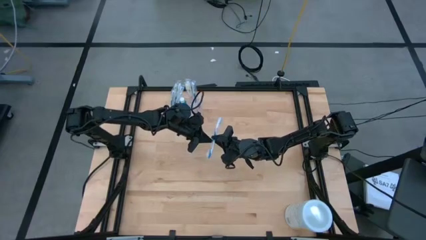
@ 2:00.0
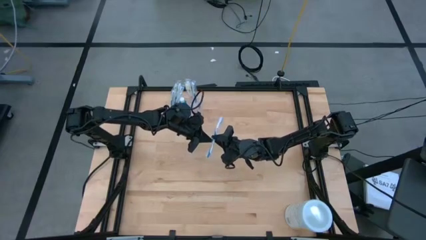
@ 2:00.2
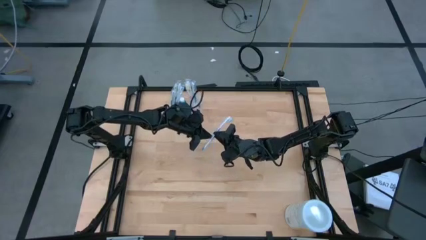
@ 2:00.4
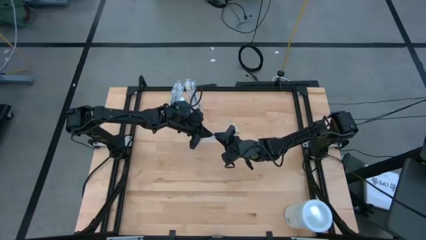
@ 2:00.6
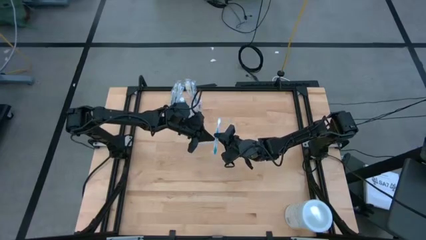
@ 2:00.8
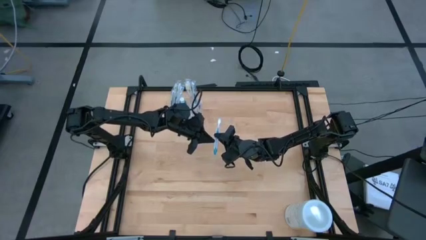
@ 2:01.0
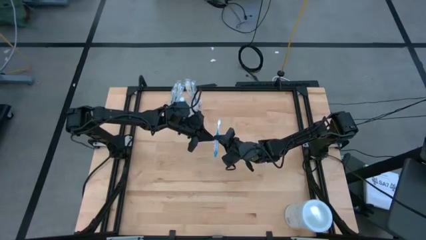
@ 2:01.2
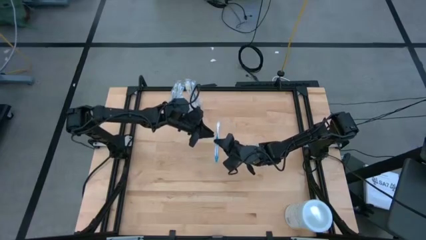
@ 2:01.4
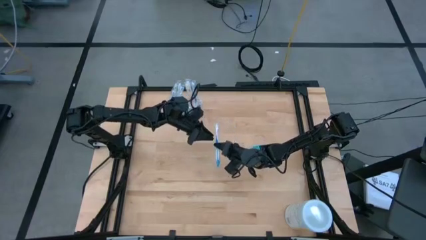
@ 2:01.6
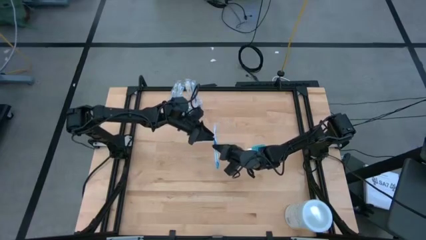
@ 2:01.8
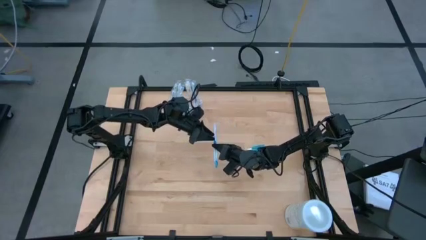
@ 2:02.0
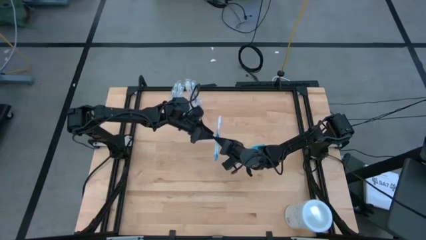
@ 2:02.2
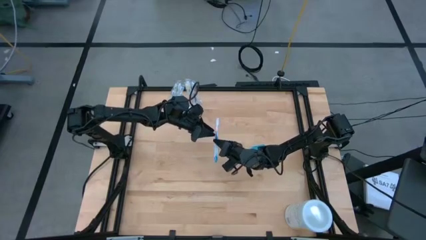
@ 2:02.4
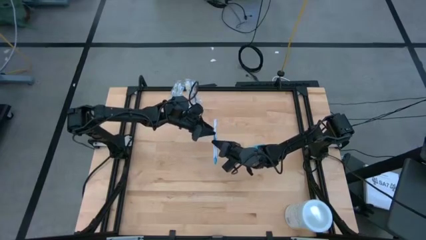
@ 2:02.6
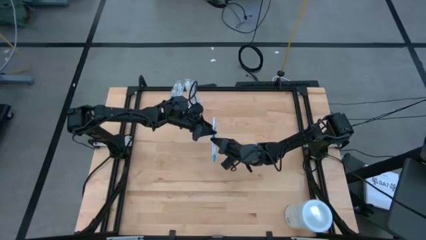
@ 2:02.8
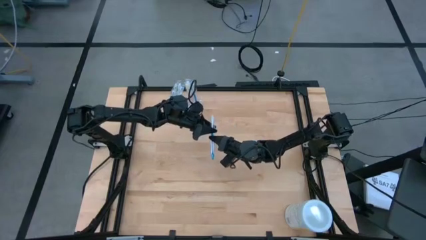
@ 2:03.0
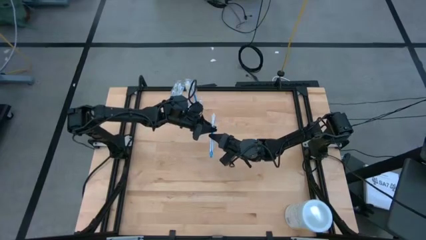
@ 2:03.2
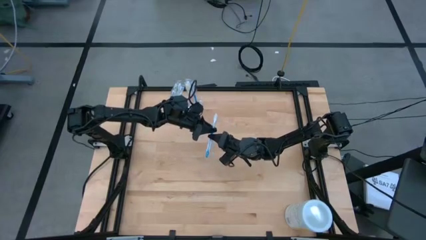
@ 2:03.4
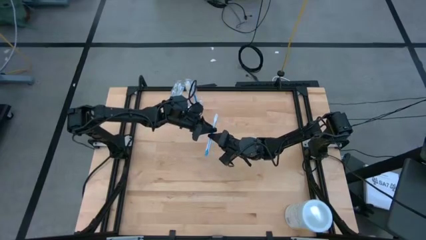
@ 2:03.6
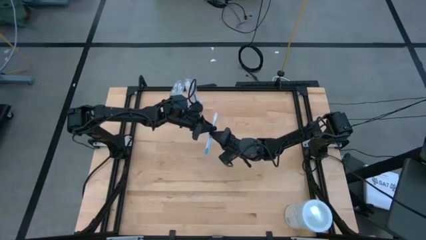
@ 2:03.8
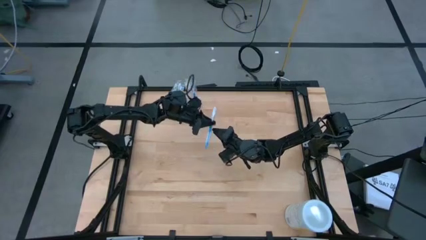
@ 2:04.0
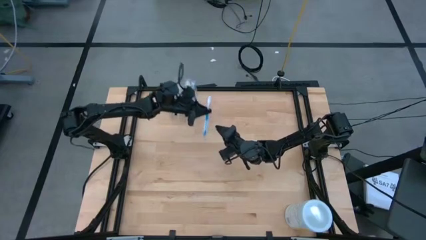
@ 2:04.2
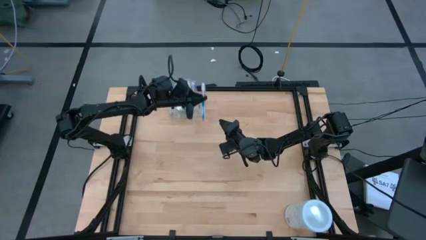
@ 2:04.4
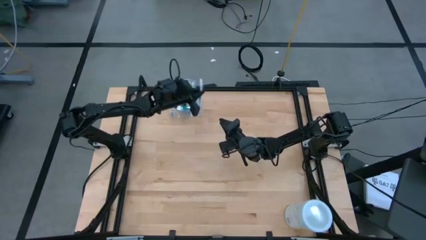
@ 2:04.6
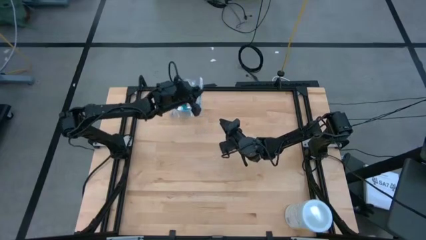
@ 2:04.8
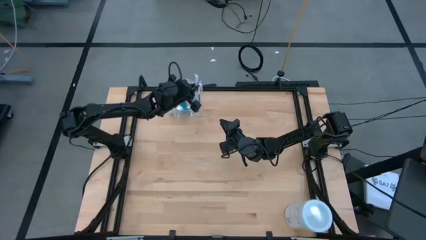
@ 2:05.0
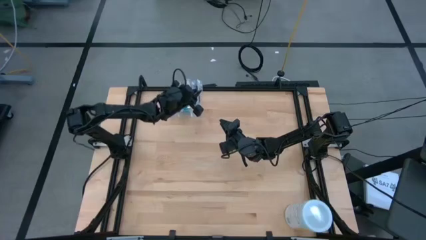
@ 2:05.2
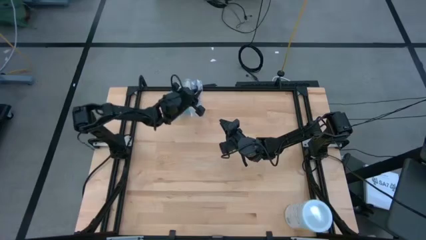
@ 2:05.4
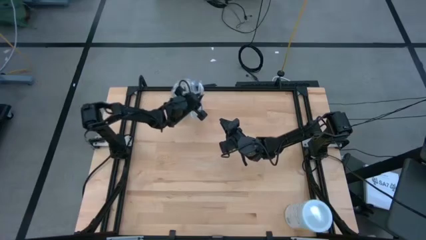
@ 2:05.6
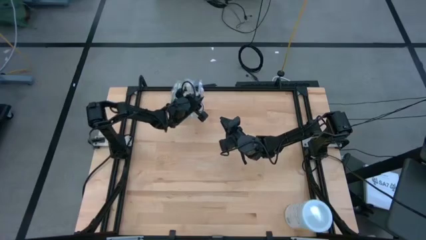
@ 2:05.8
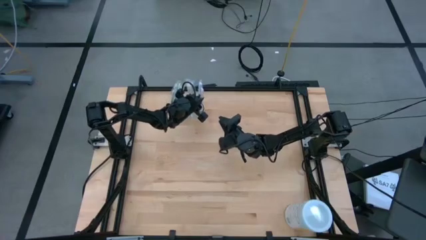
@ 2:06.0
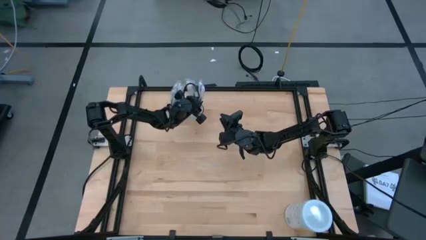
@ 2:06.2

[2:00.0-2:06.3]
Task: Pick & Place toothbrushing station
Put the blue toothbrush into the transparent organizer

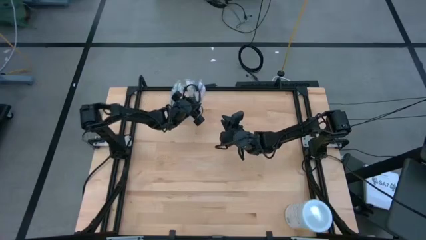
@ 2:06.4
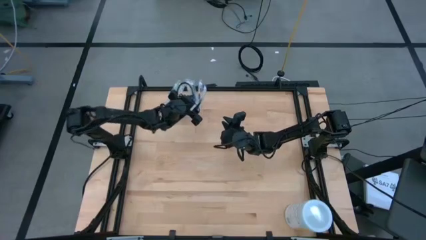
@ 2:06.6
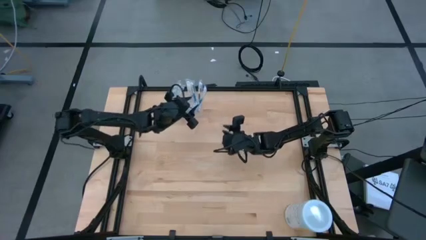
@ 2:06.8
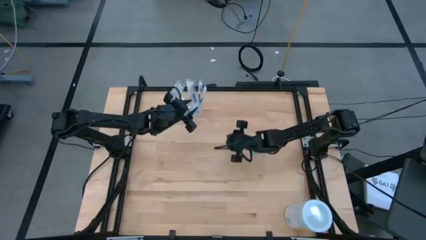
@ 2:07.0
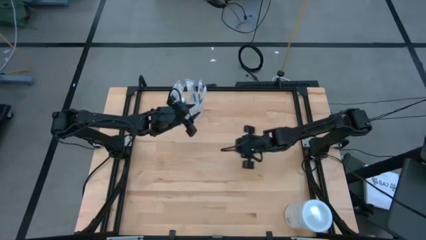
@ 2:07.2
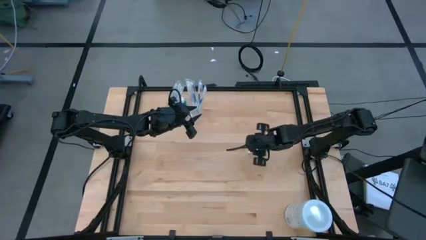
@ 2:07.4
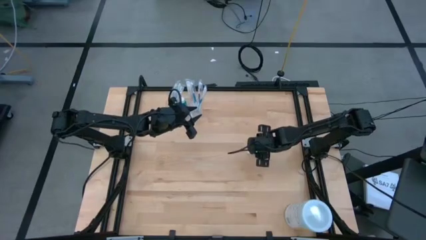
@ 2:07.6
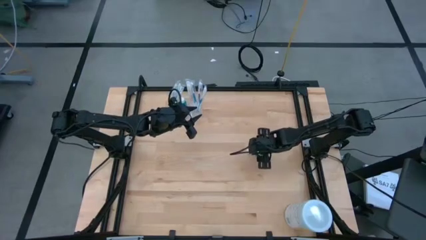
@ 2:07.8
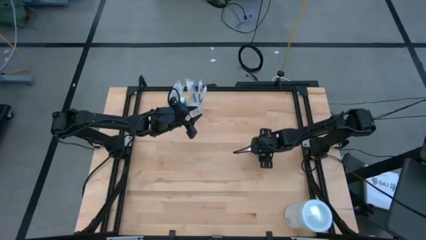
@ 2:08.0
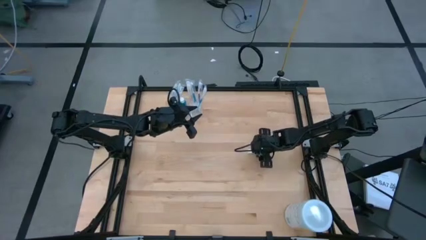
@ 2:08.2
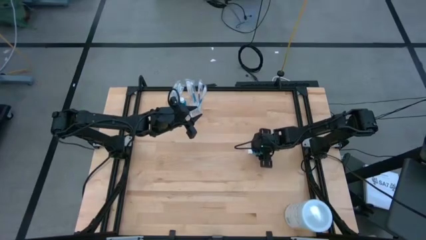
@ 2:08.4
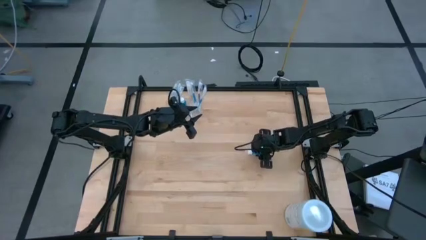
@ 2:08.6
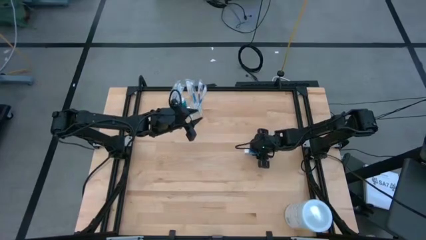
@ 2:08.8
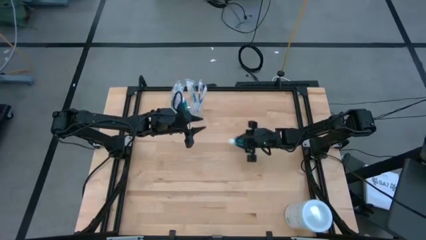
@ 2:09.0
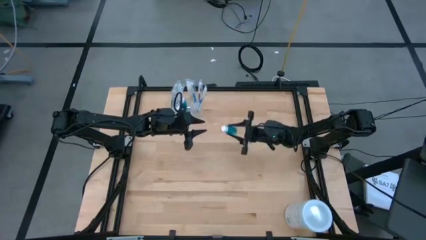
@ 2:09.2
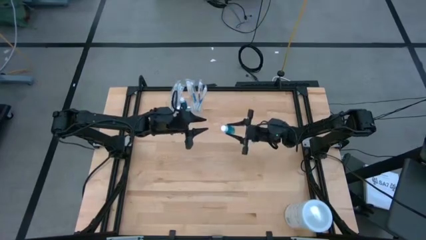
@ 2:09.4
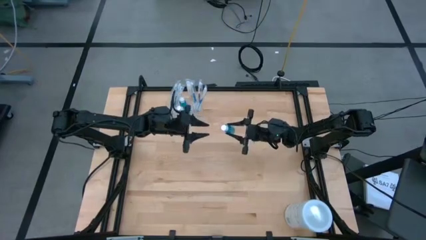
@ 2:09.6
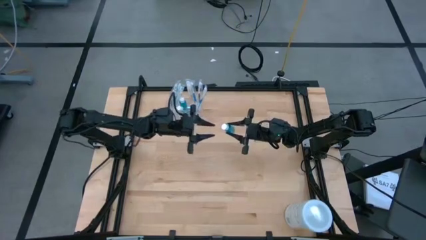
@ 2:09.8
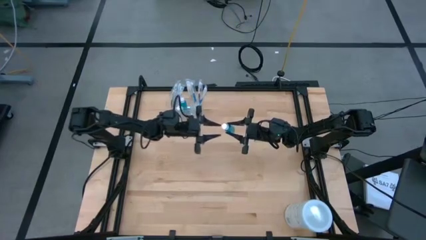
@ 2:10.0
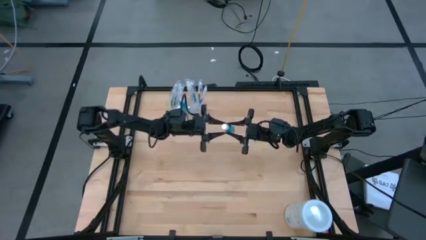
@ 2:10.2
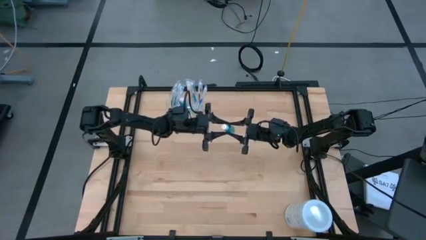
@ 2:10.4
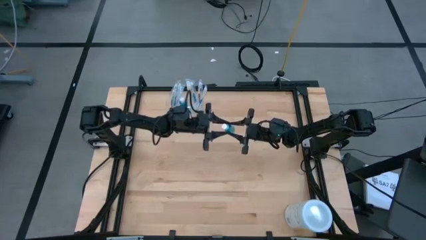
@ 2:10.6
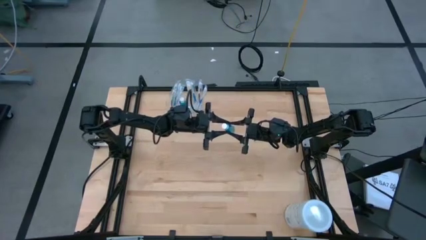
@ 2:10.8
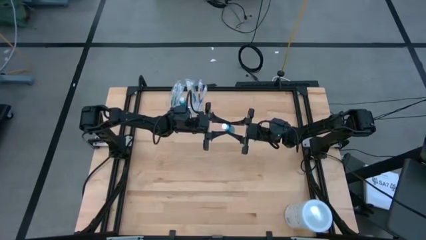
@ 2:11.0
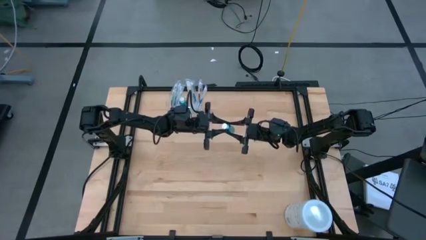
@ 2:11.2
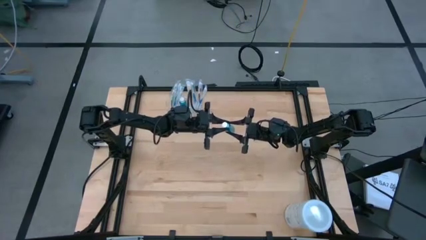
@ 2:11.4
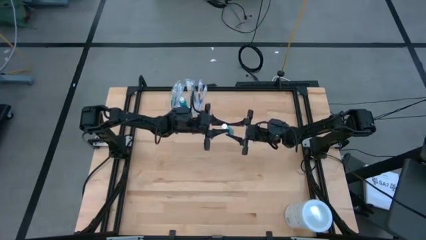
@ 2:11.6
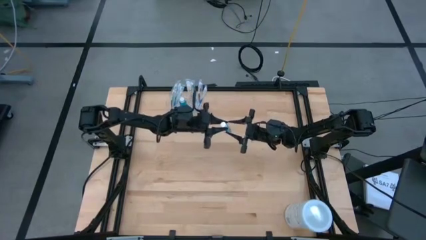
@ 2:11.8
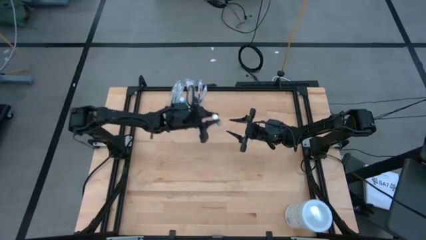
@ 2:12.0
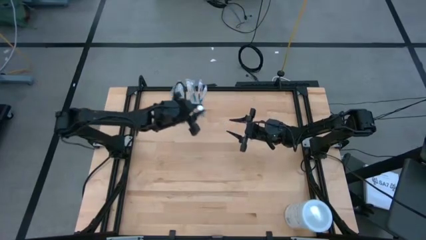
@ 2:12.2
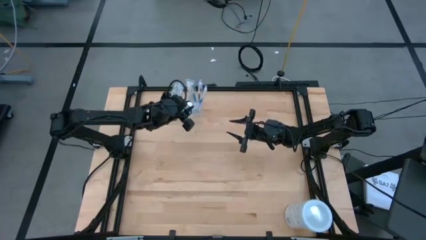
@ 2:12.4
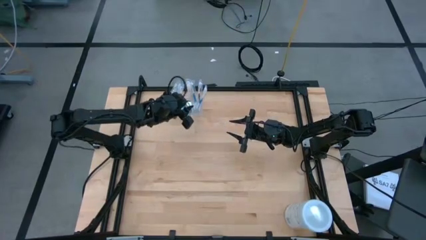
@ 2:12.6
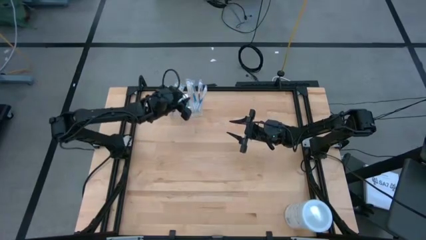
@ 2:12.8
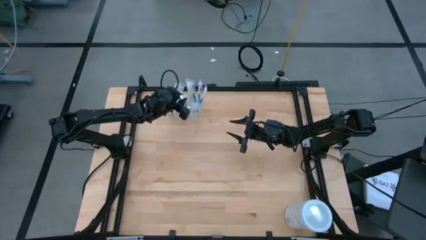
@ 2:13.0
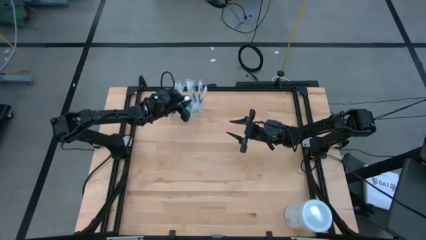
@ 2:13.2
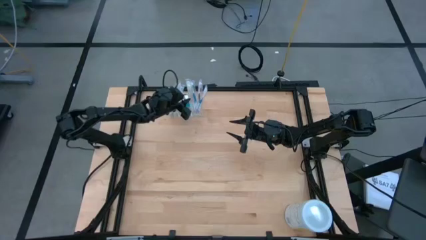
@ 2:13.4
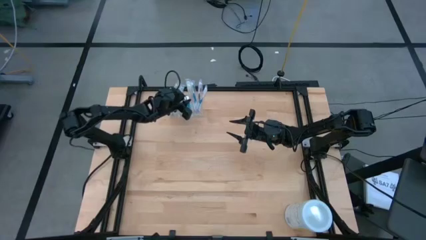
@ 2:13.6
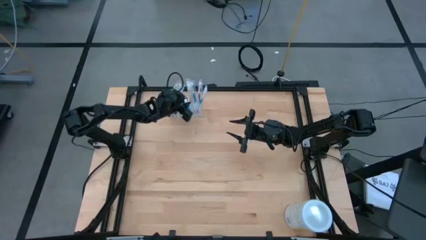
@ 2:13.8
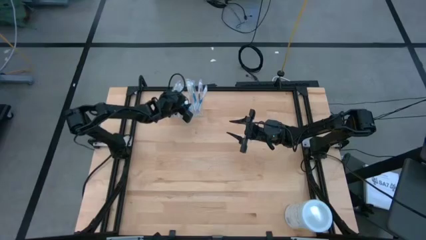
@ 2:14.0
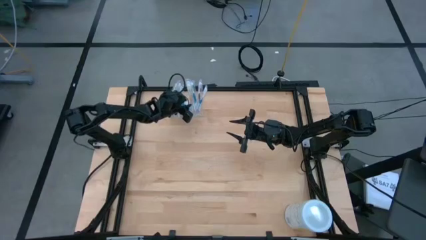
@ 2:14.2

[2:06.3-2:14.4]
Put the small blue bottle into the transparent organizer

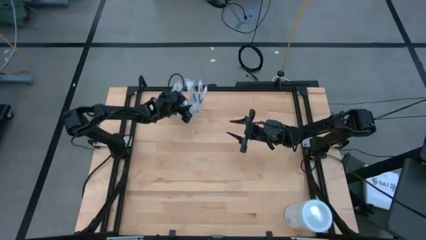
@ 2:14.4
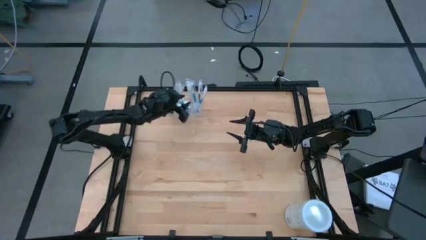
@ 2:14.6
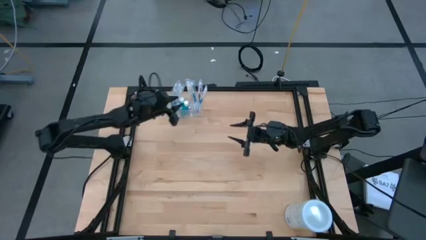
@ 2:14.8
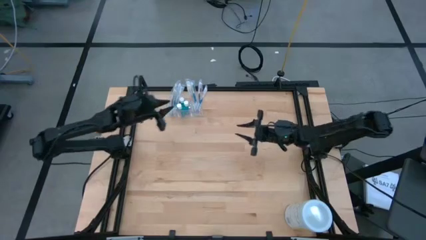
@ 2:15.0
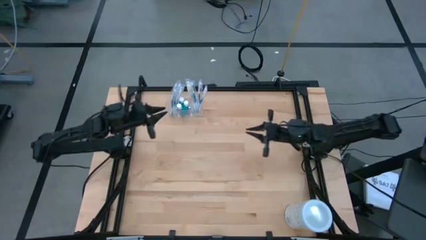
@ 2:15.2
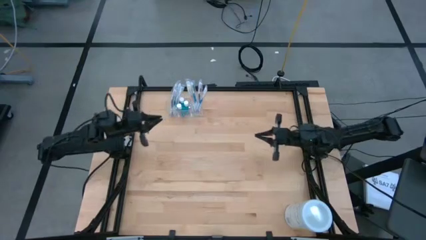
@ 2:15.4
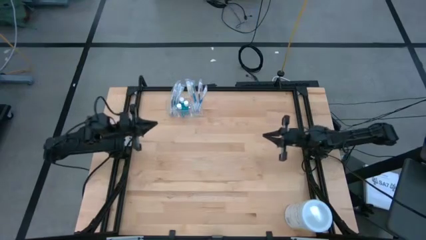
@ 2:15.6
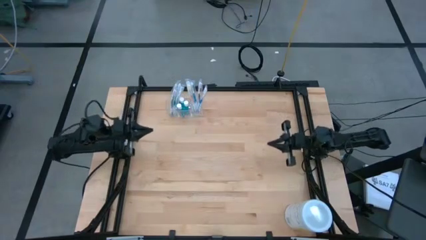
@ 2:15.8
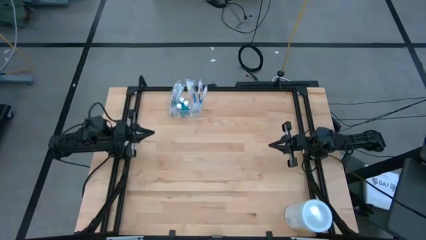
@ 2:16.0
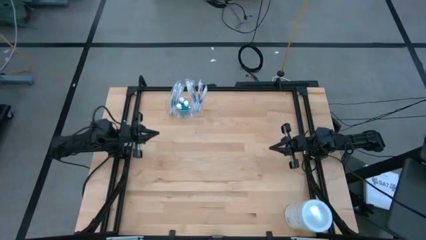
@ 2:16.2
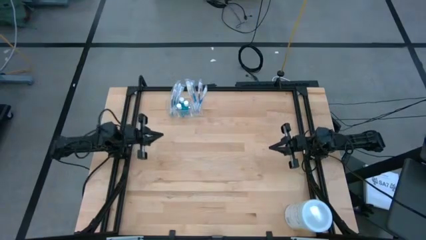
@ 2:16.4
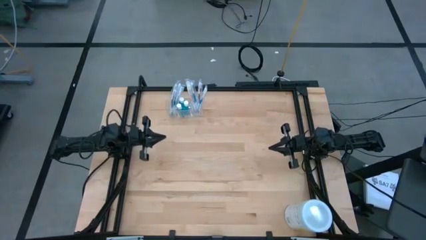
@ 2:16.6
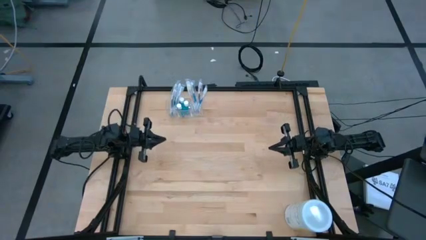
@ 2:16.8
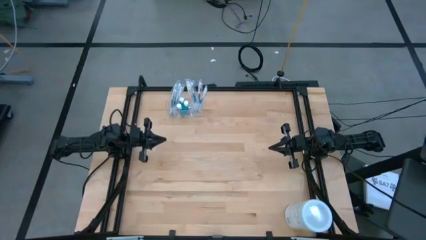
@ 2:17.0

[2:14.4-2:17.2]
Return to Home Position
